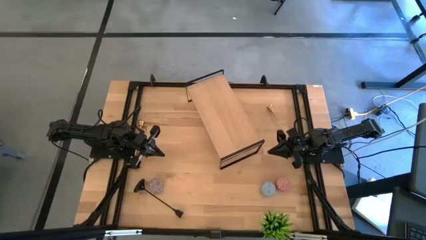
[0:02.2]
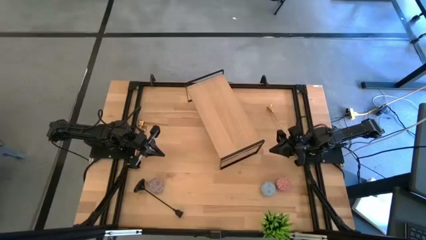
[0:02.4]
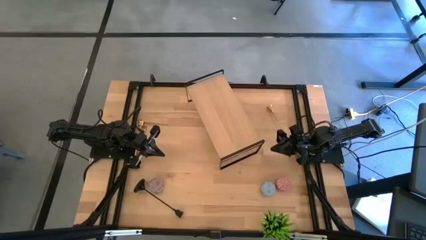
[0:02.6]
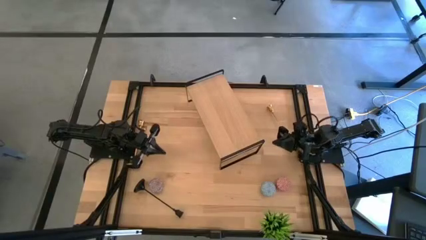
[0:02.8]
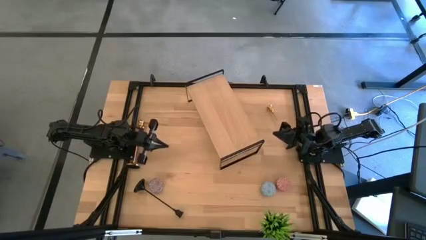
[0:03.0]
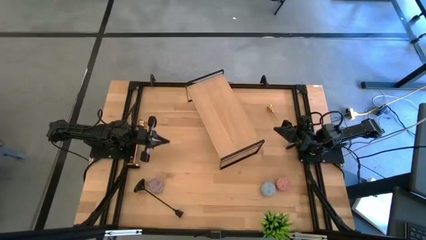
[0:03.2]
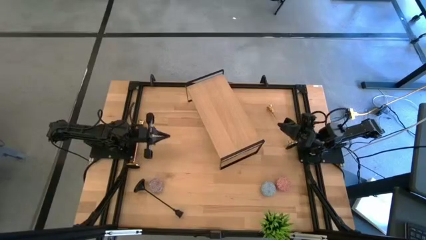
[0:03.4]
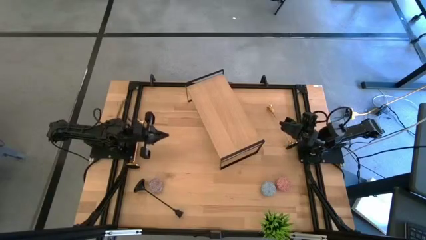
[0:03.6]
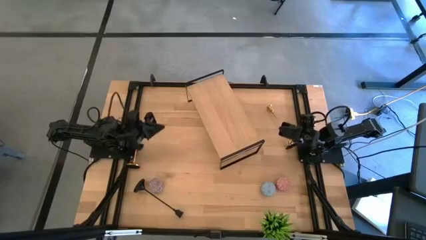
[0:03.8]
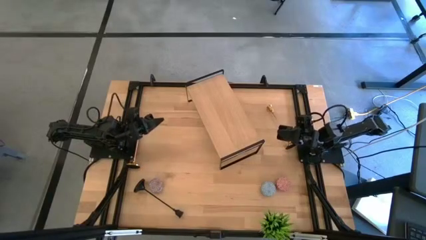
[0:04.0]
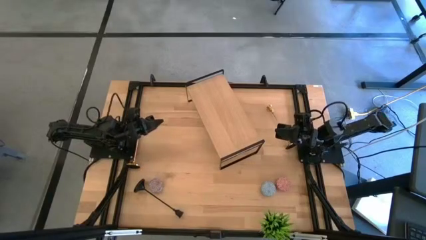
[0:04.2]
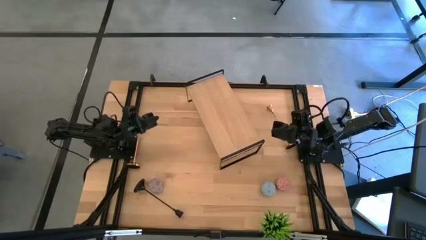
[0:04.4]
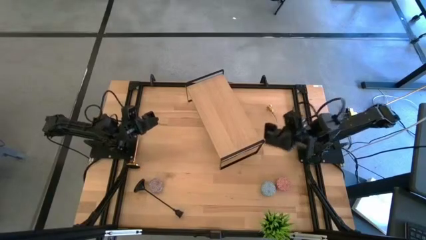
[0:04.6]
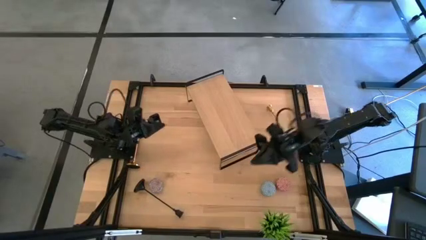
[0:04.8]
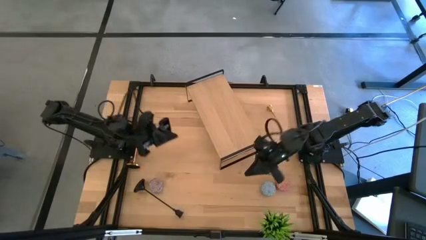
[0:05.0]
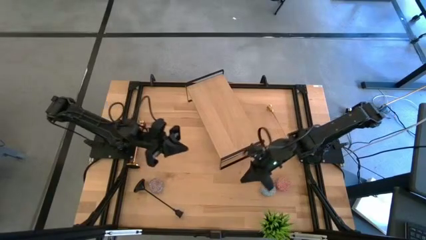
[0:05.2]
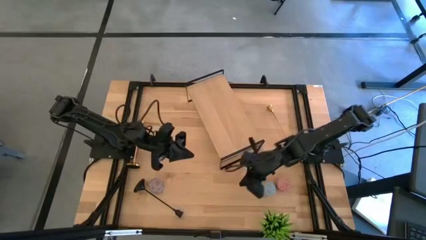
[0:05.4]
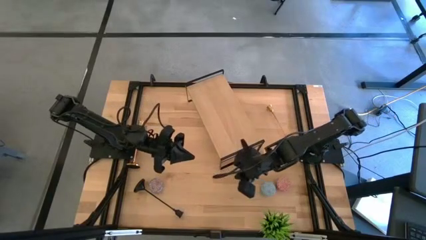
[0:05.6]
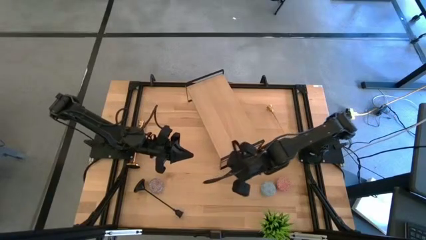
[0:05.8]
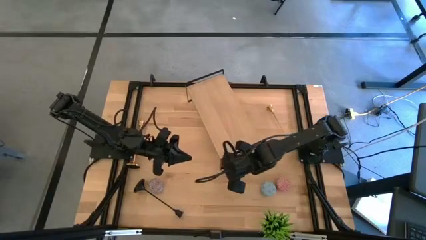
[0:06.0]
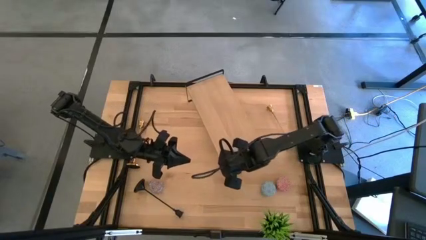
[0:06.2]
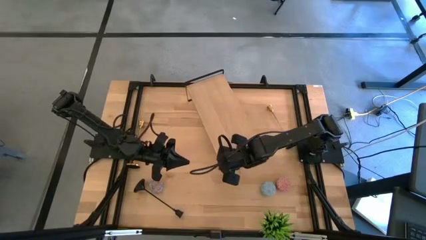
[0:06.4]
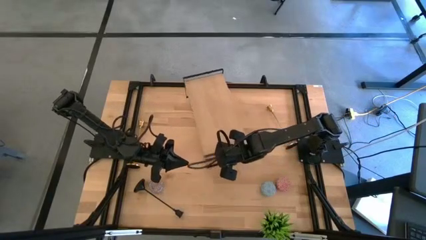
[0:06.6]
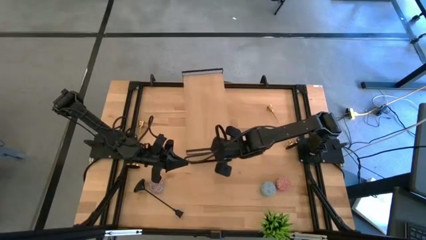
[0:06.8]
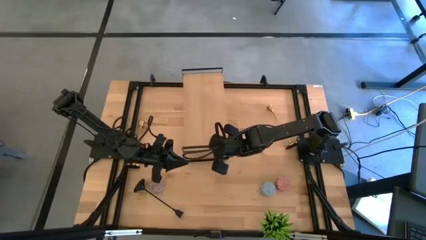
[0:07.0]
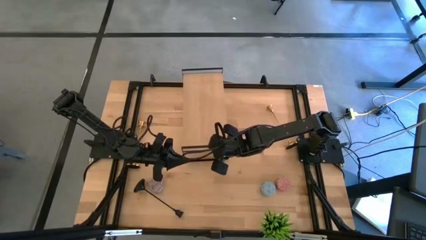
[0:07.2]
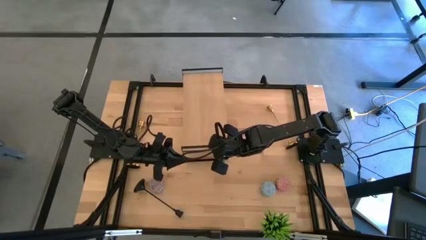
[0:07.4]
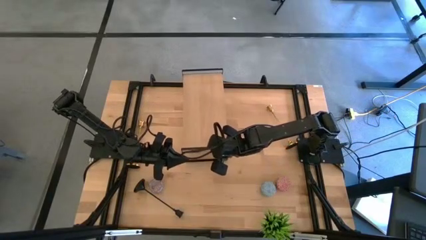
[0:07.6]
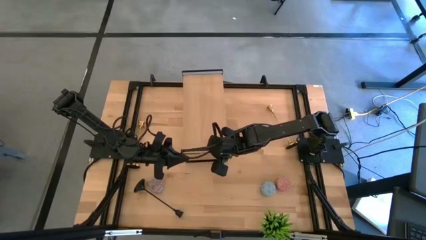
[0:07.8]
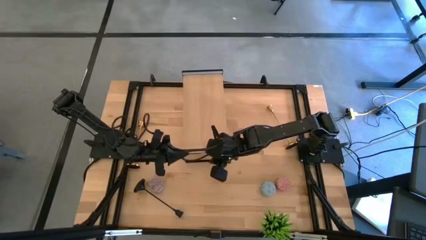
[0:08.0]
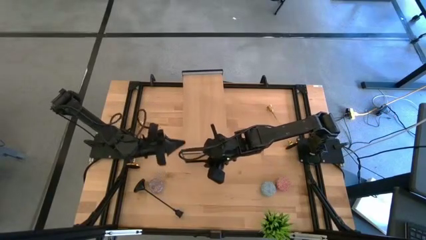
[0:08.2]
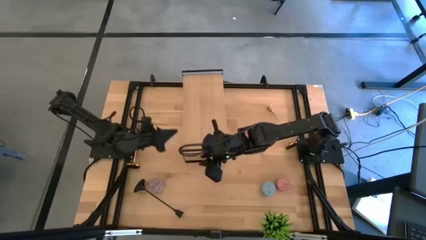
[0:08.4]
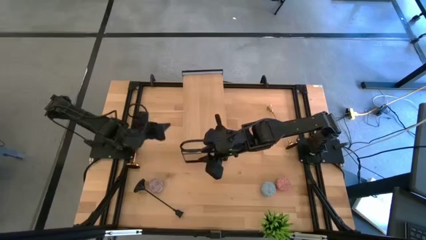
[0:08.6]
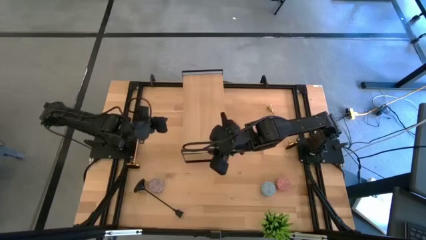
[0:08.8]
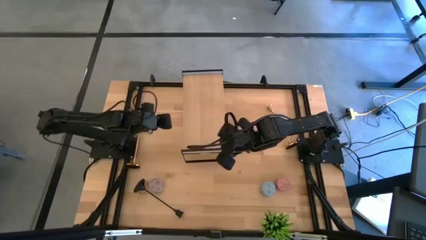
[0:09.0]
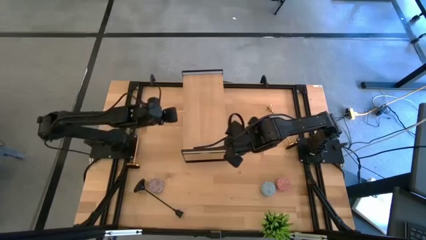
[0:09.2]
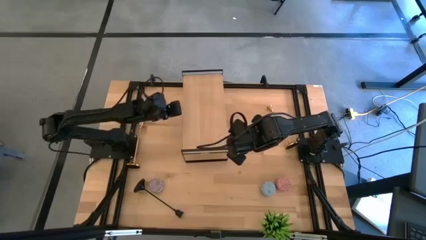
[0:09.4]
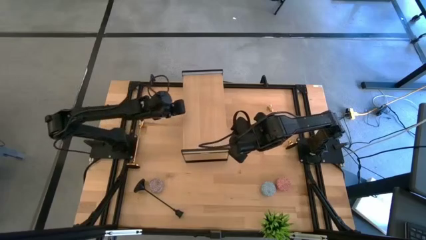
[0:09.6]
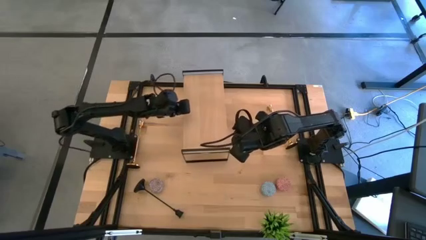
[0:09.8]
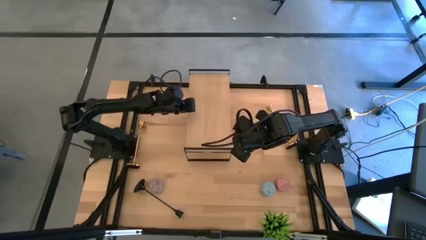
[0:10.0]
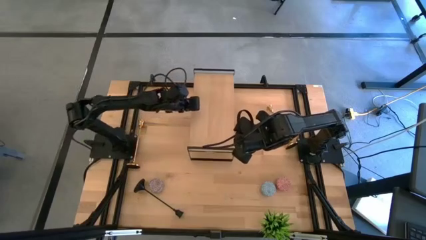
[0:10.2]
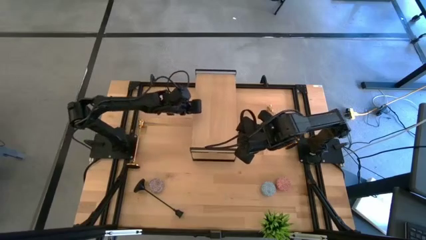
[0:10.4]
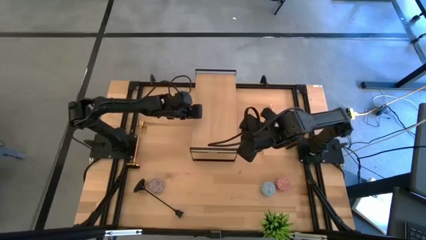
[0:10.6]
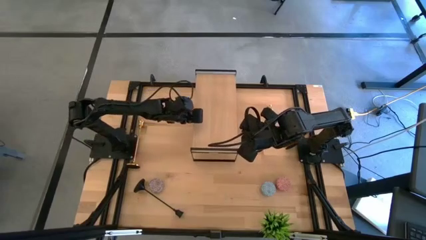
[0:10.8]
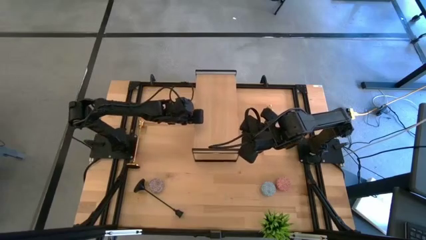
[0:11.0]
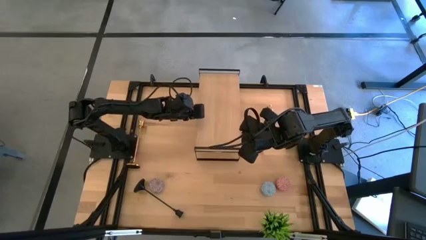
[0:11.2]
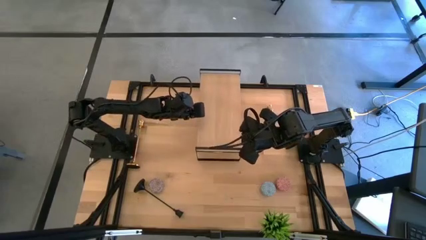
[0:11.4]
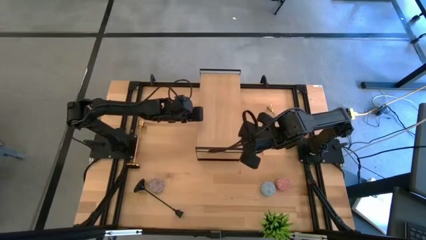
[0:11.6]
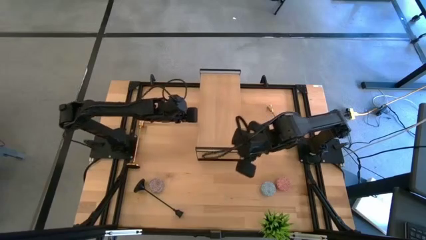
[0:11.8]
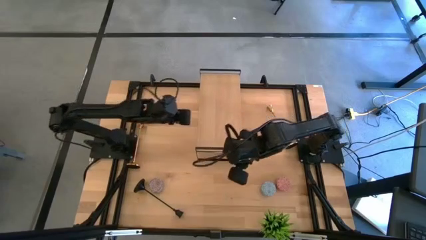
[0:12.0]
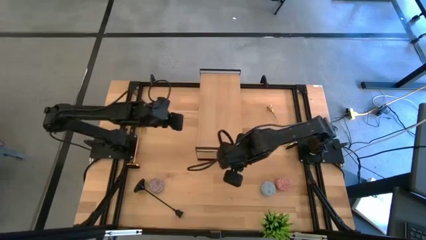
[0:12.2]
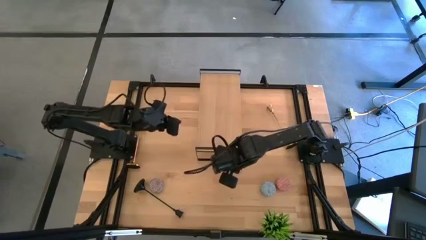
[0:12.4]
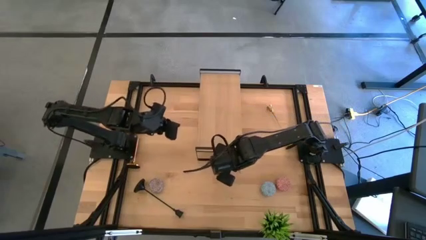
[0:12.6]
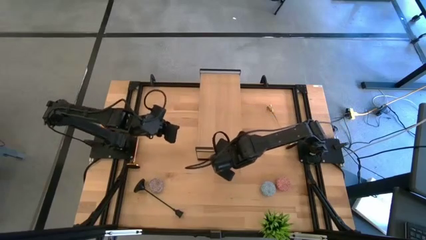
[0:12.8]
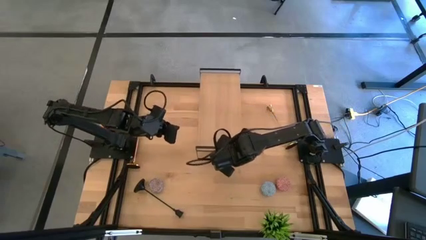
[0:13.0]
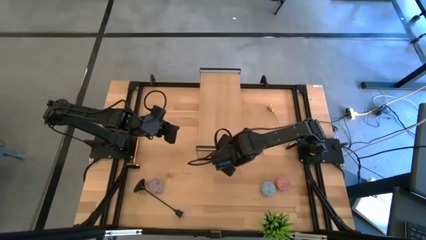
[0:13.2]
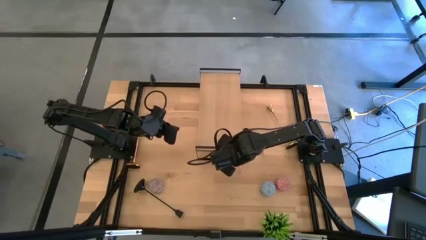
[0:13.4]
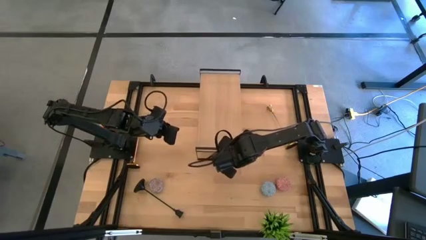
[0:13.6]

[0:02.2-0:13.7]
Task: Pick & Place candle stick holders
Adjust the shelf on the table
